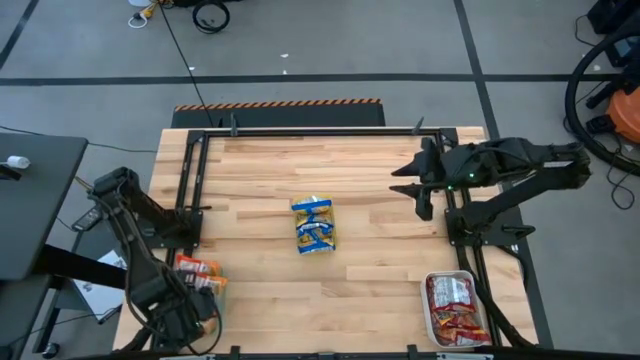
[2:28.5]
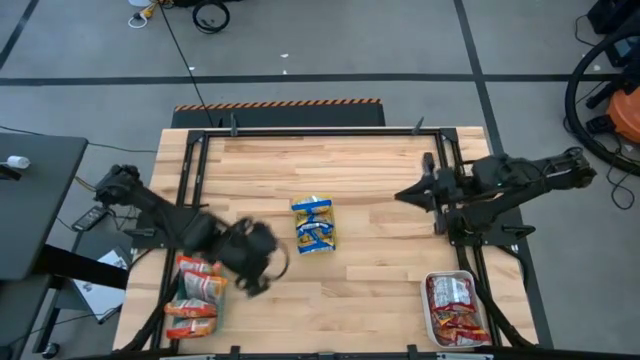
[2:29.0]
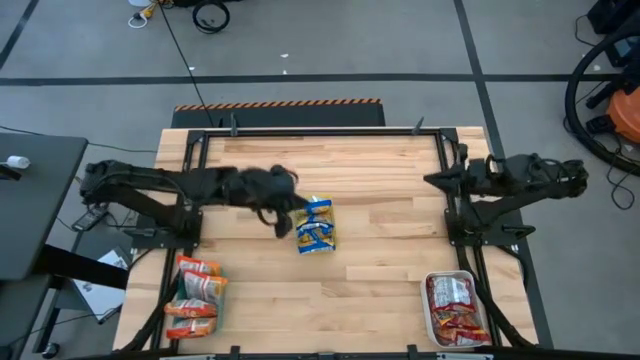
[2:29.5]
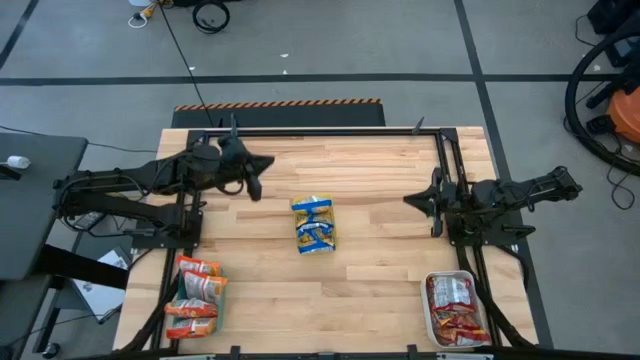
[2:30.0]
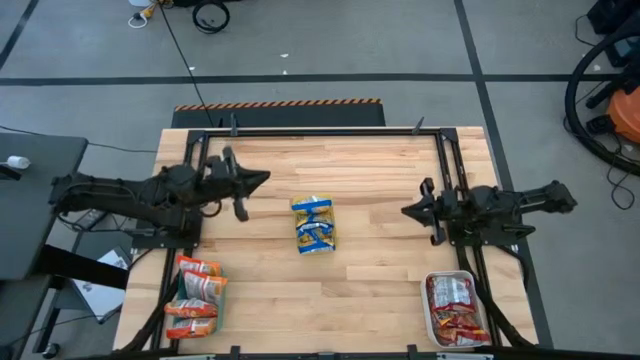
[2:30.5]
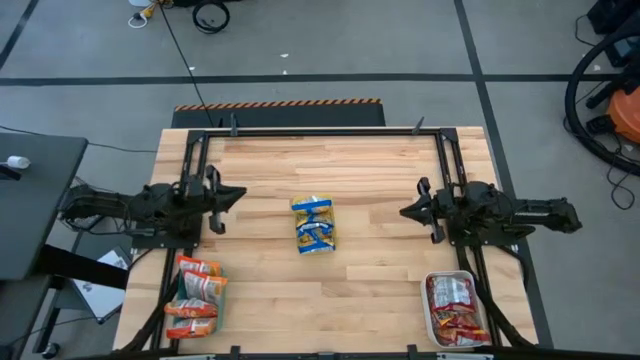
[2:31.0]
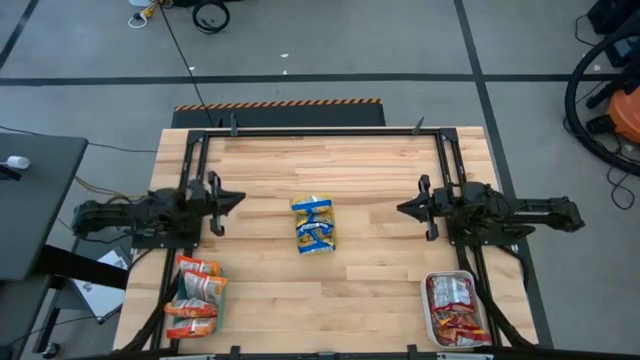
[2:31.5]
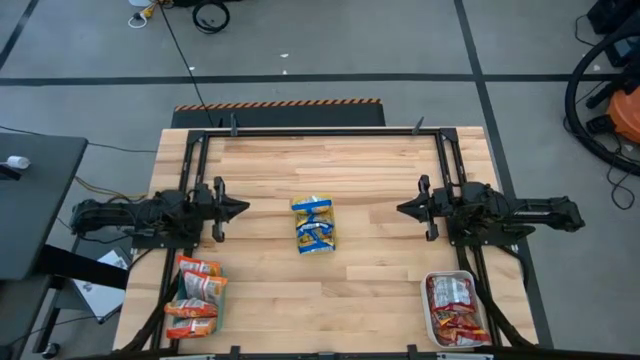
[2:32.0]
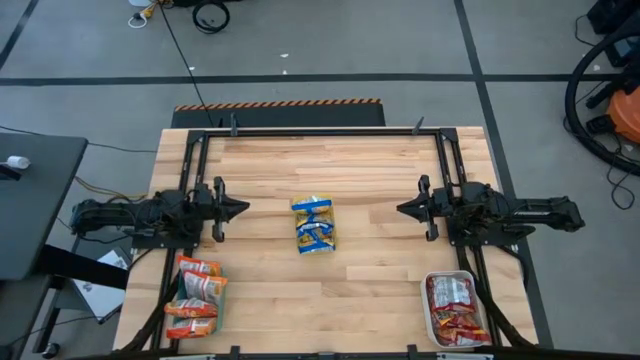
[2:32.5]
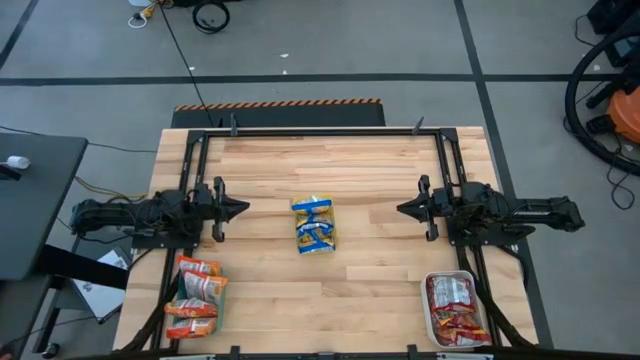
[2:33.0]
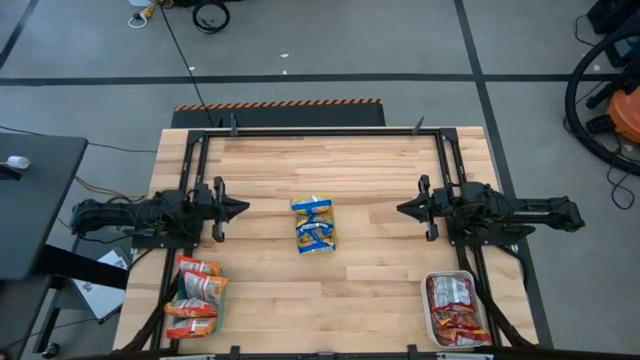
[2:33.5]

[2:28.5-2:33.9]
Task: Sort Maruchan noodles
Return to Home Position

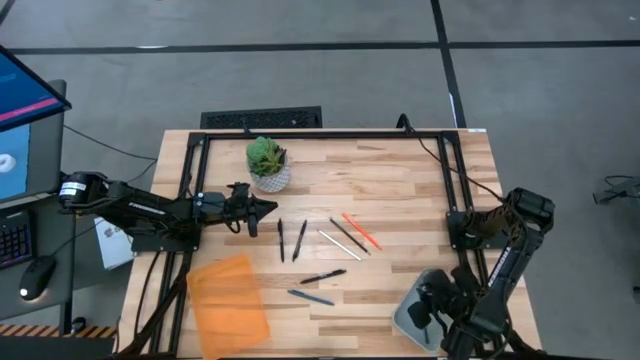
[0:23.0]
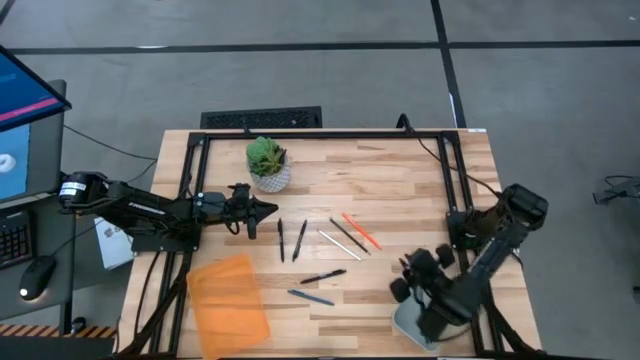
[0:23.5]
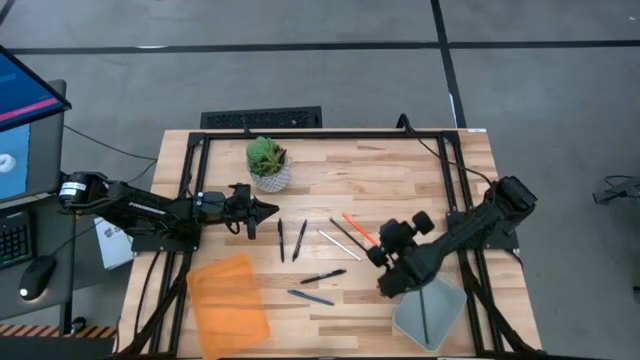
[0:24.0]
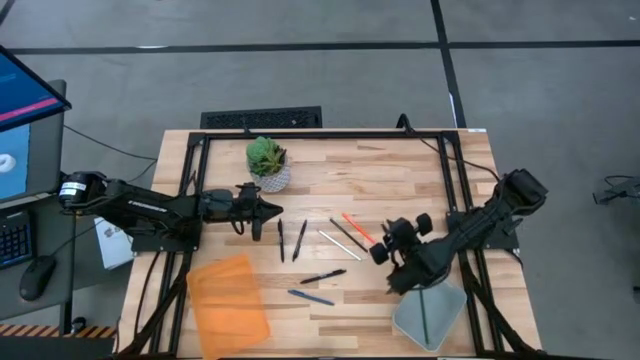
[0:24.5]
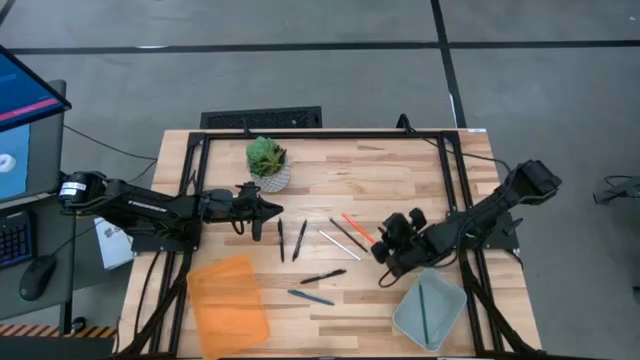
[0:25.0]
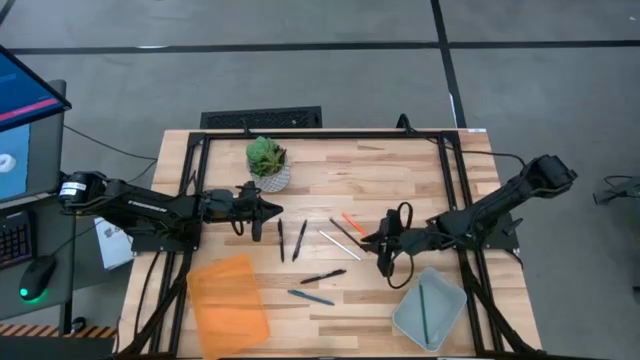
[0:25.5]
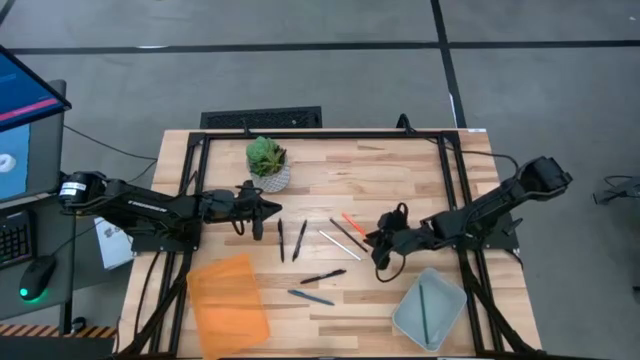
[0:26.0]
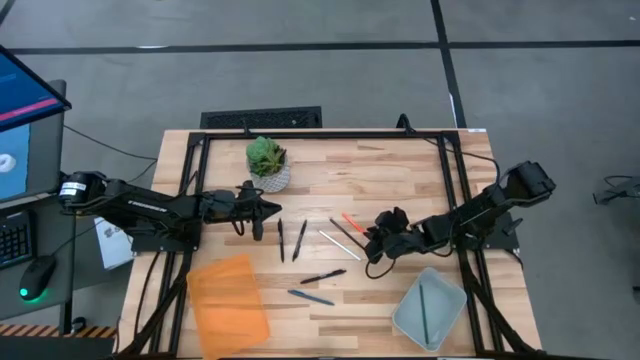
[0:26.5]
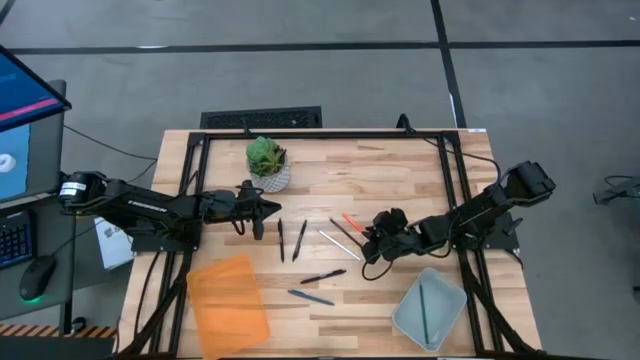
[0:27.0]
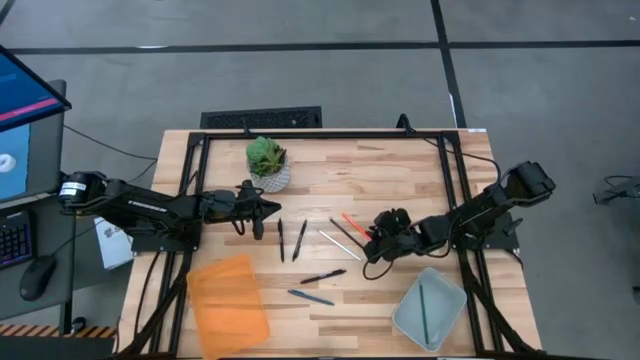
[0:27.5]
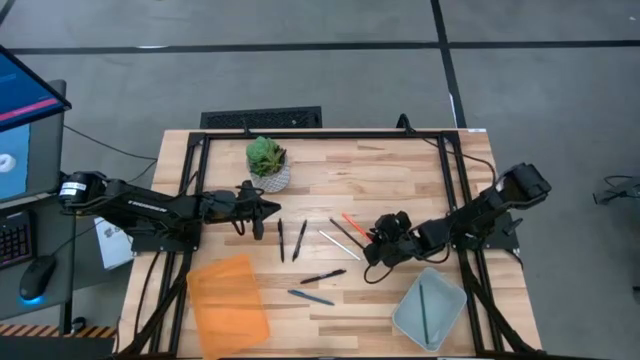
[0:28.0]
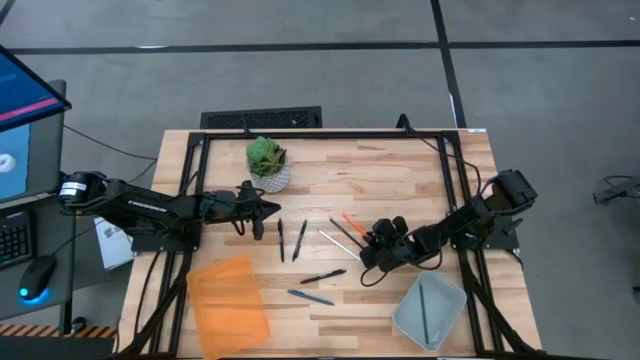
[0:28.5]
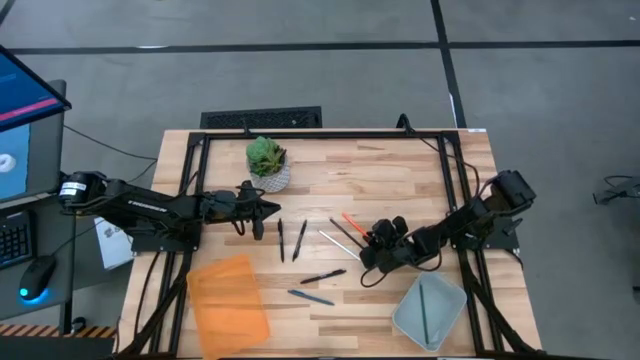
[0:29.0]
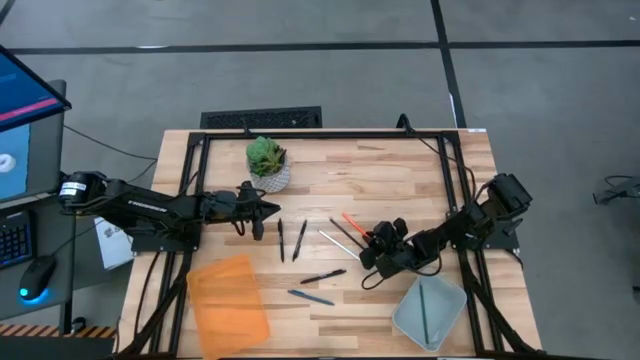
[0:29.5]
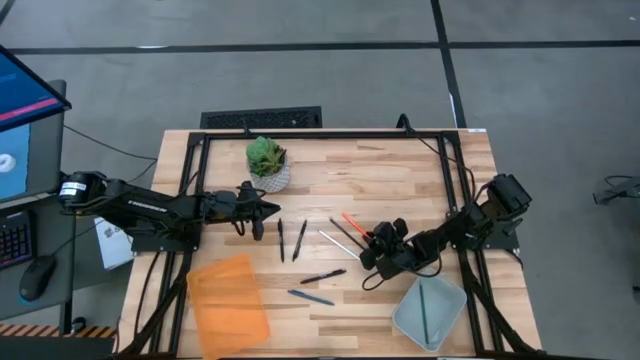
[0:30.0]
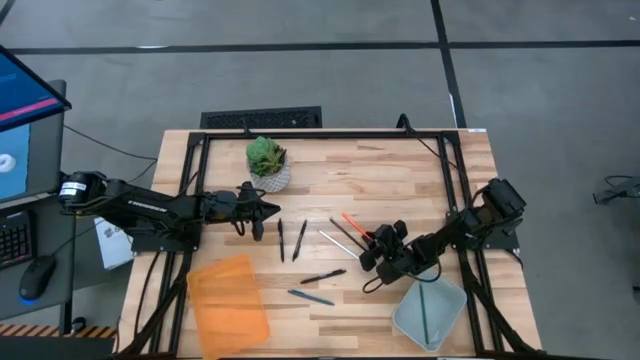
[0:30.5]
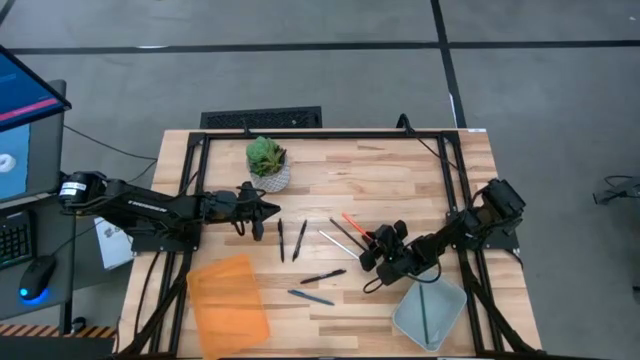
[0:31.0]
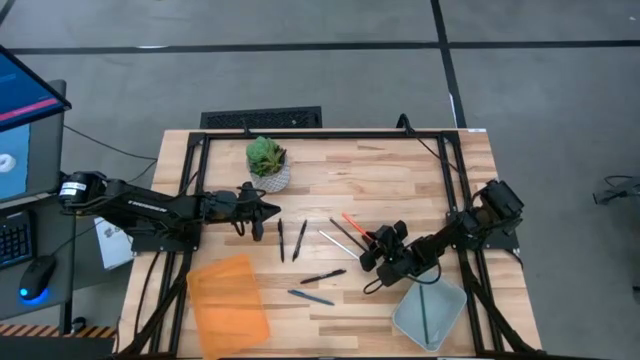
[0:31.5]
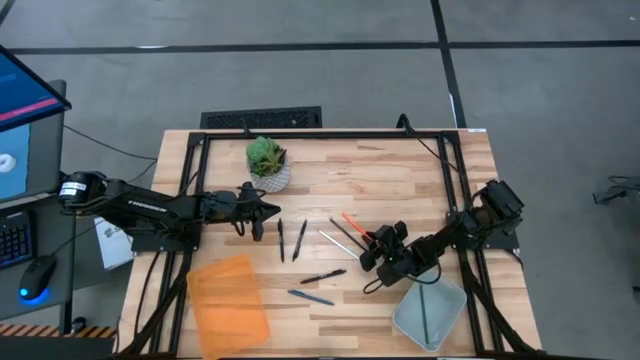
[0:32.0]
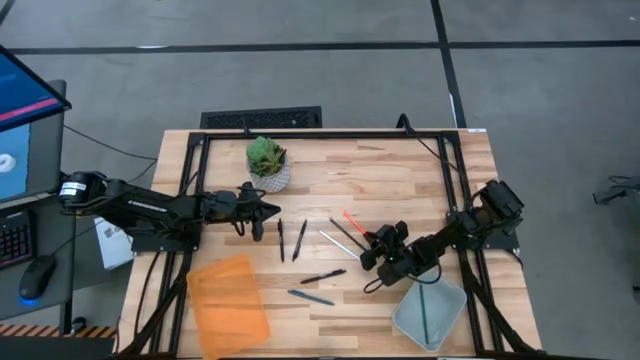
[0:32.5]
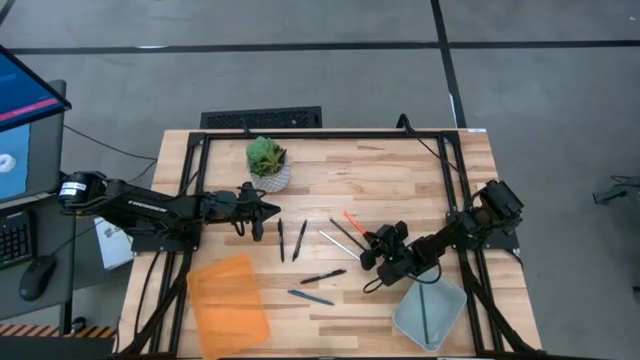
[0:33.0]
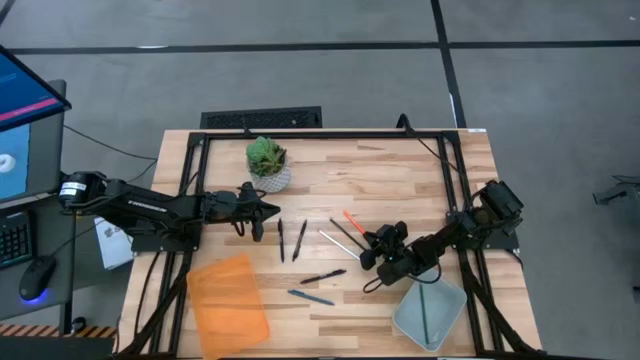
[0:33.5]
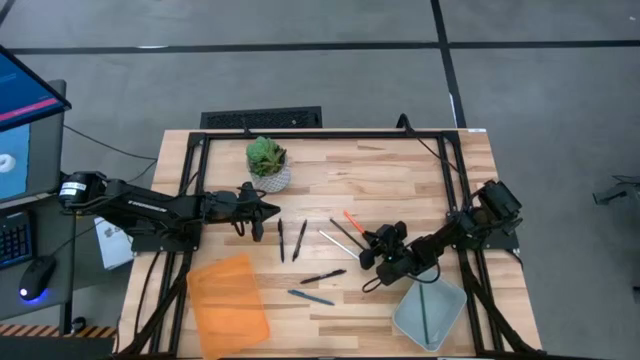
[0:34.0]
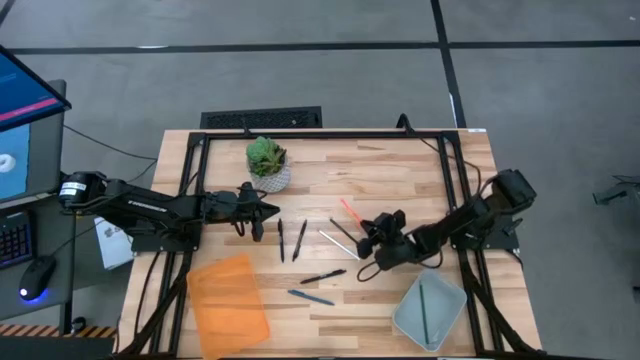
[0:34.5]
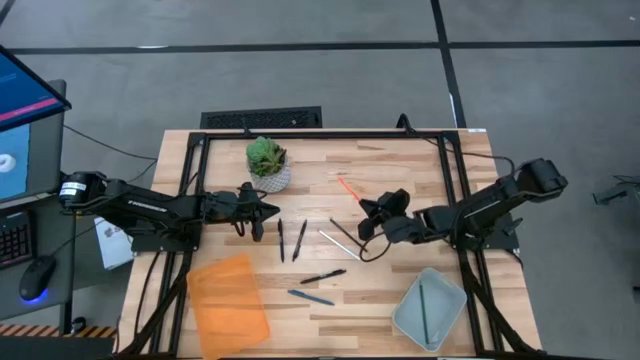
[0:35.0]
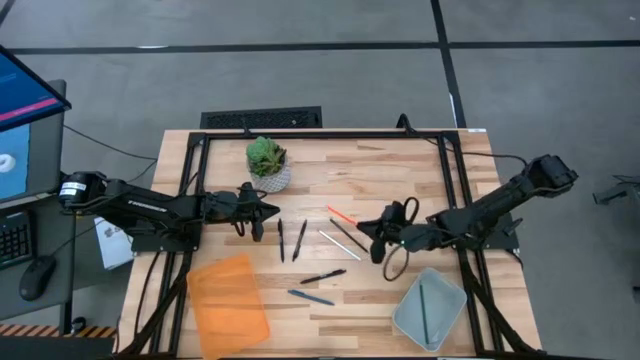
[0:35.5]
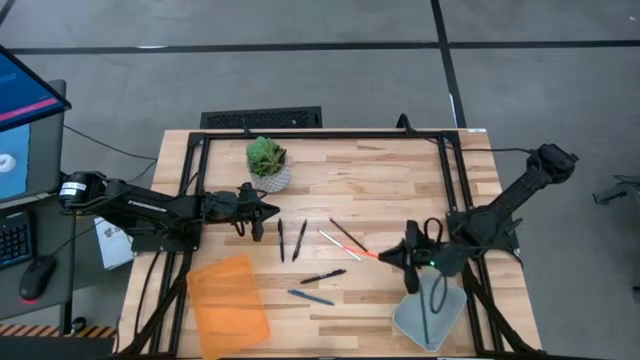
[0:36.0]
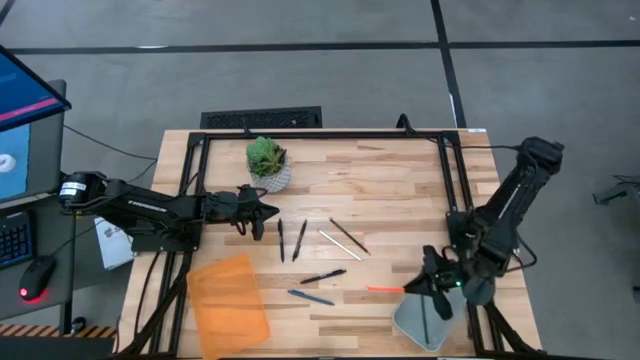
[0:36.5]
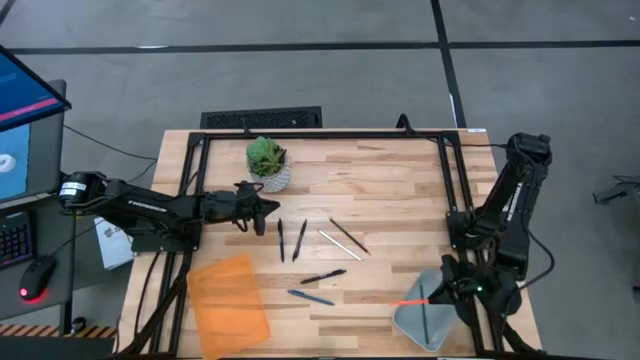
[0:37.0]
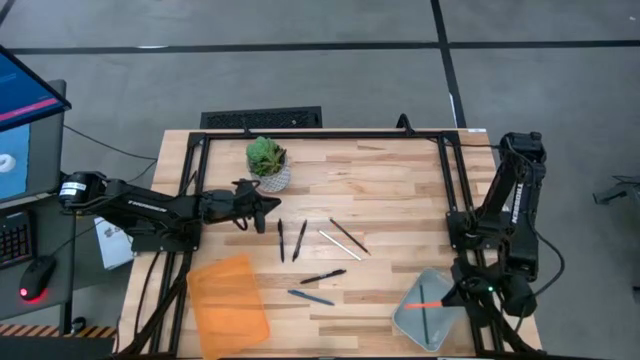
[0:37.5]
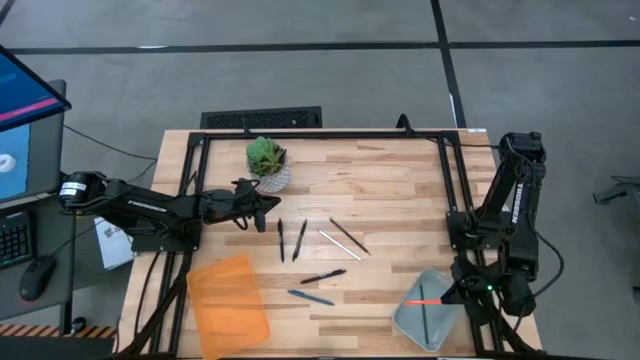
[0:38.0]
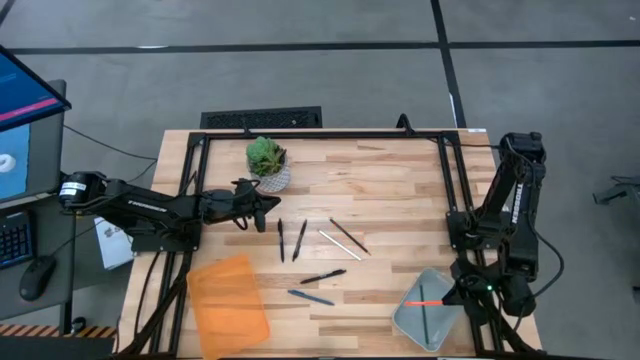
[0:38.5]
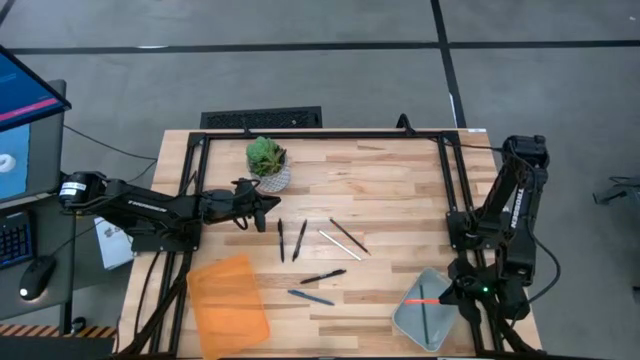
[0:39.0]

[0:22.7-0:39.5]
Task: Sort pens & pencils
Put the orange pencil into the gray bin
